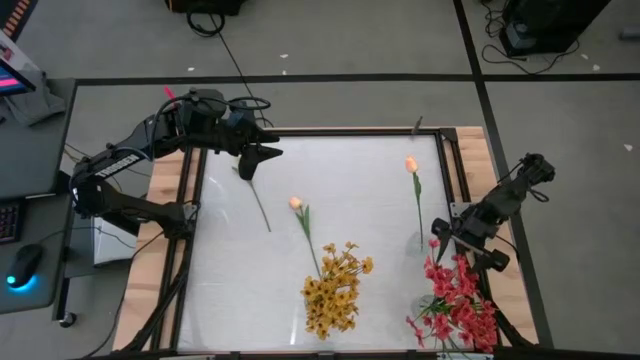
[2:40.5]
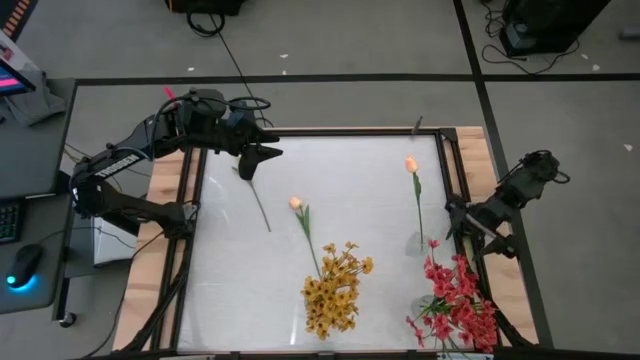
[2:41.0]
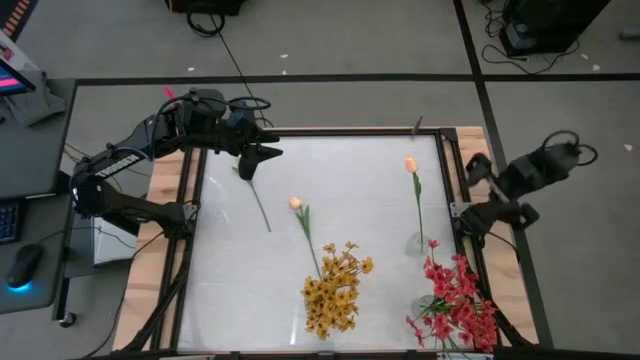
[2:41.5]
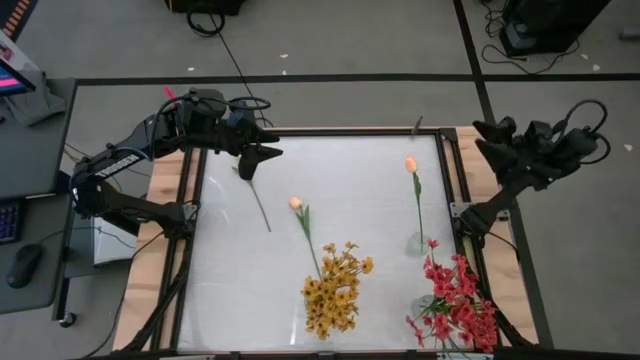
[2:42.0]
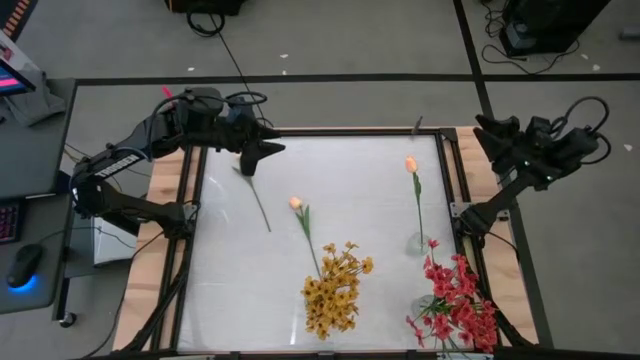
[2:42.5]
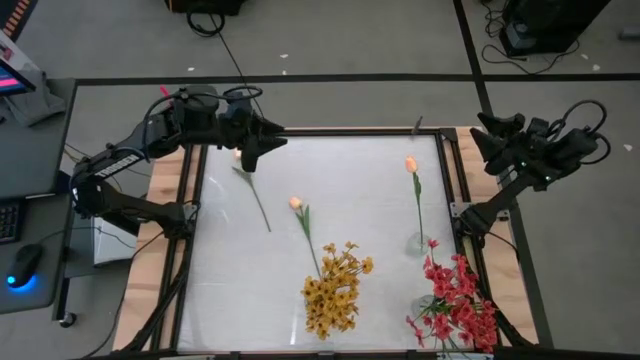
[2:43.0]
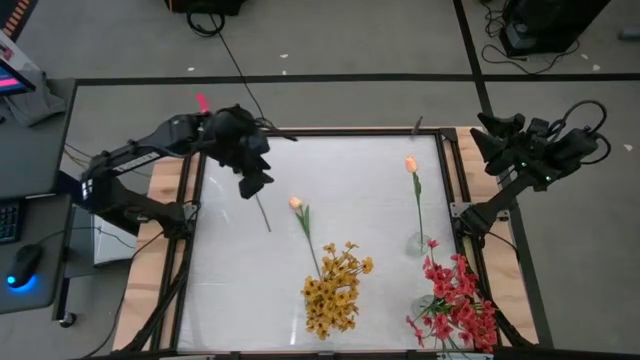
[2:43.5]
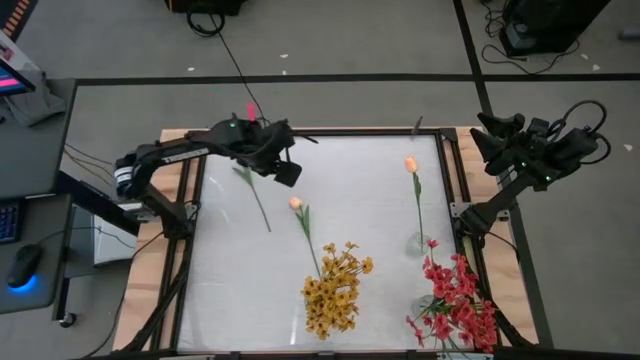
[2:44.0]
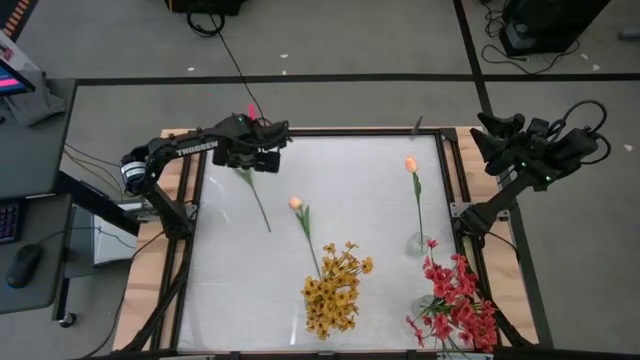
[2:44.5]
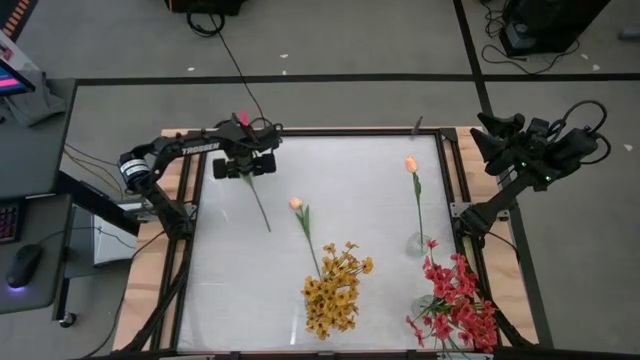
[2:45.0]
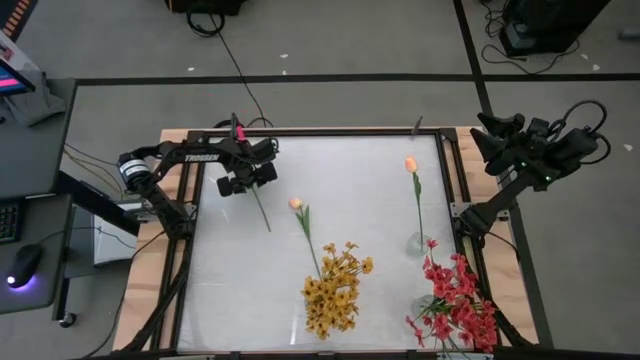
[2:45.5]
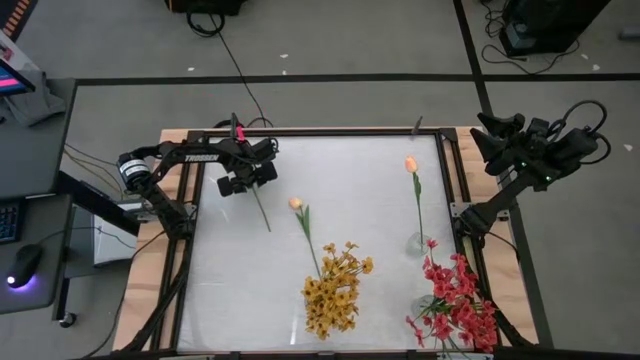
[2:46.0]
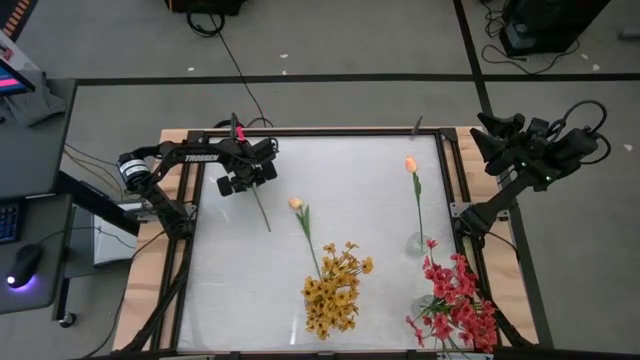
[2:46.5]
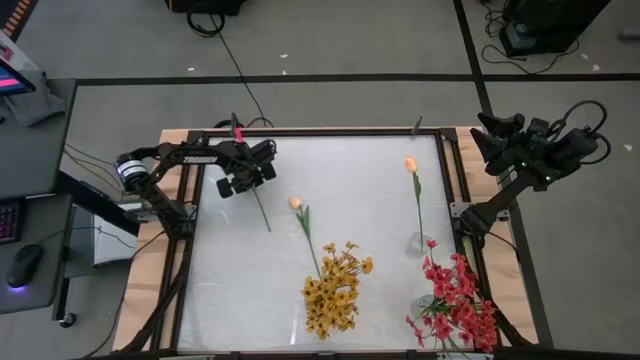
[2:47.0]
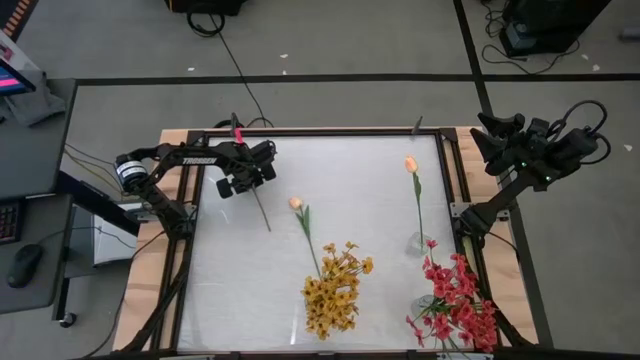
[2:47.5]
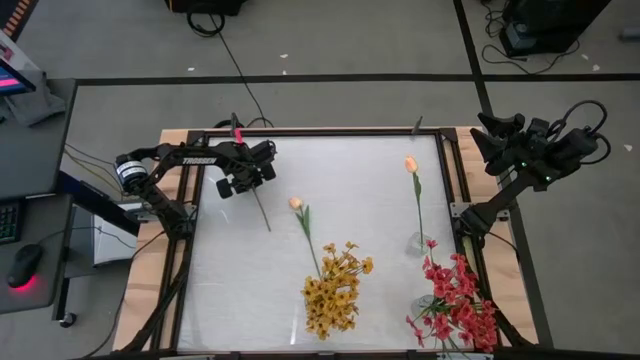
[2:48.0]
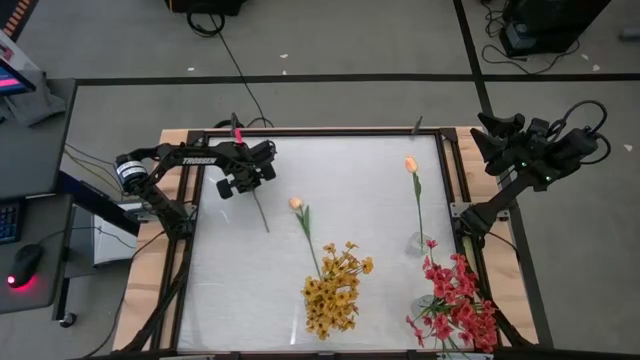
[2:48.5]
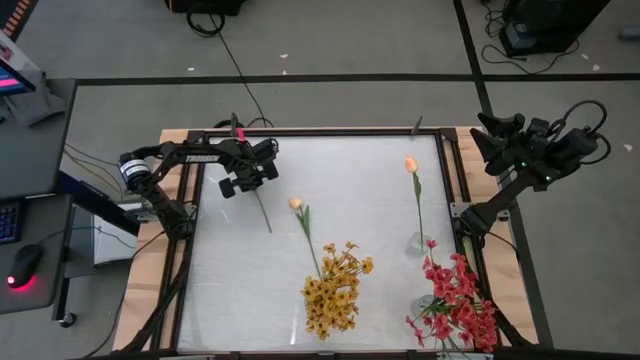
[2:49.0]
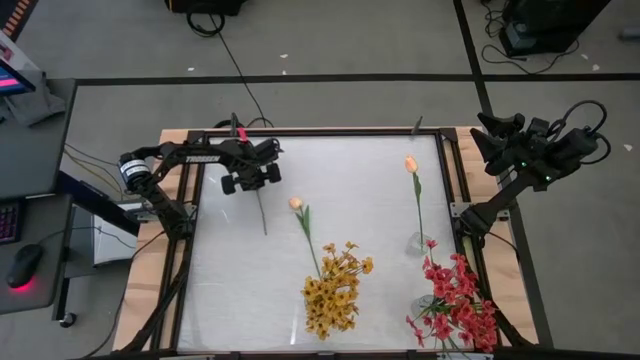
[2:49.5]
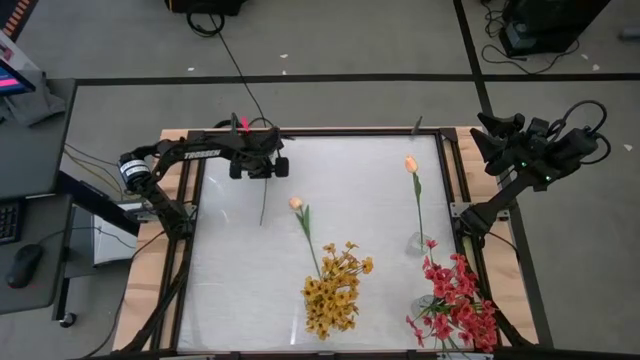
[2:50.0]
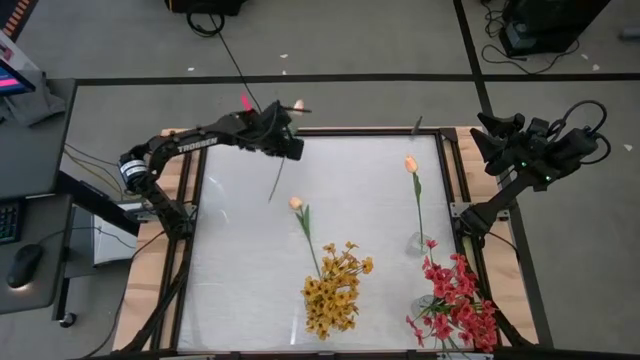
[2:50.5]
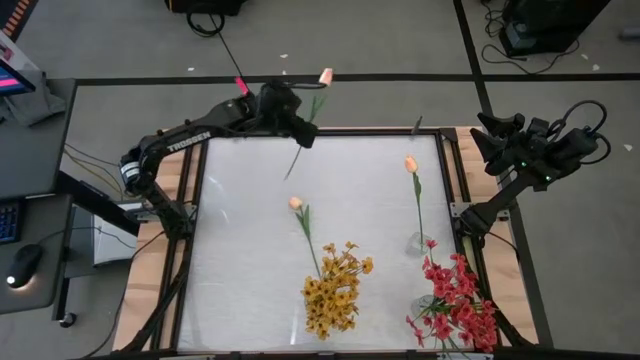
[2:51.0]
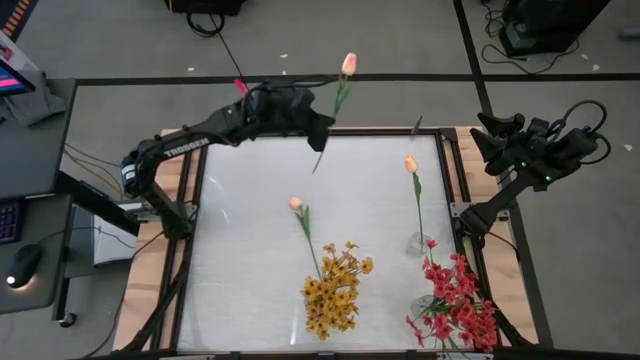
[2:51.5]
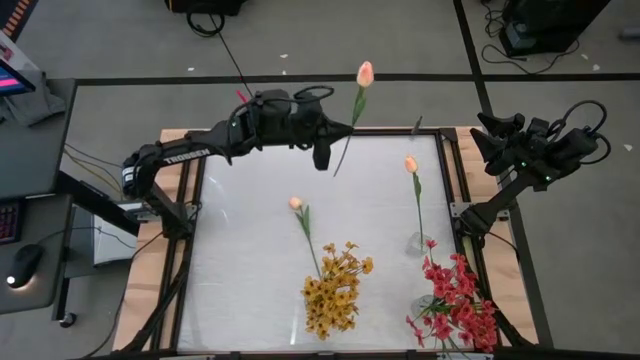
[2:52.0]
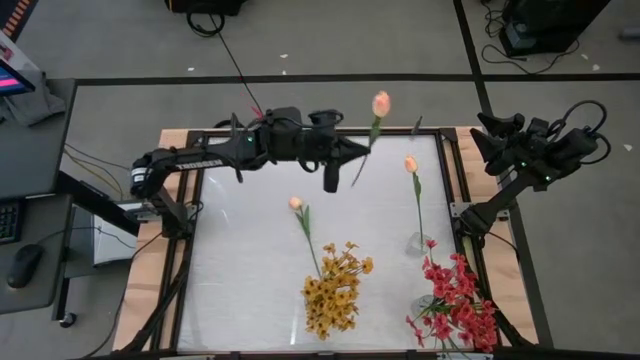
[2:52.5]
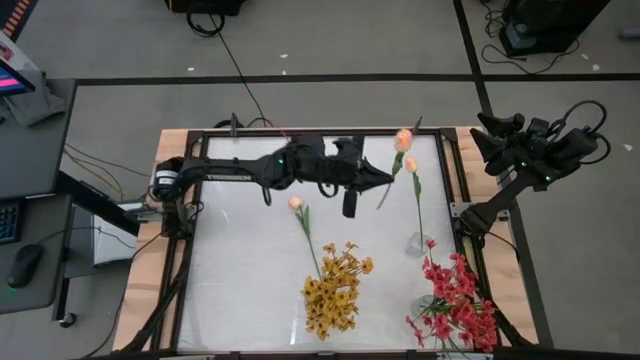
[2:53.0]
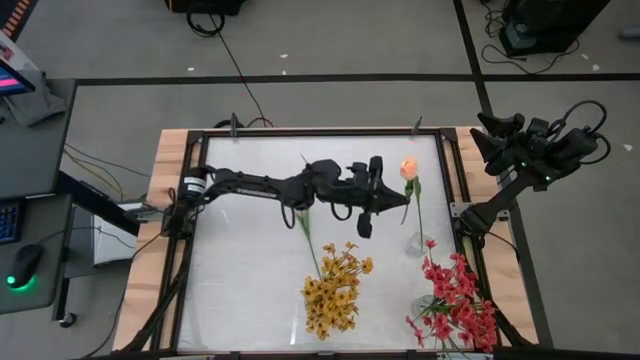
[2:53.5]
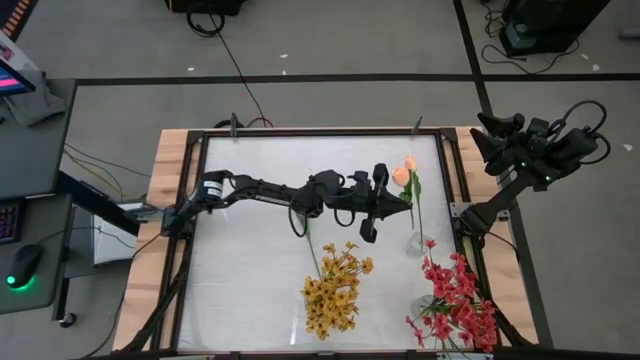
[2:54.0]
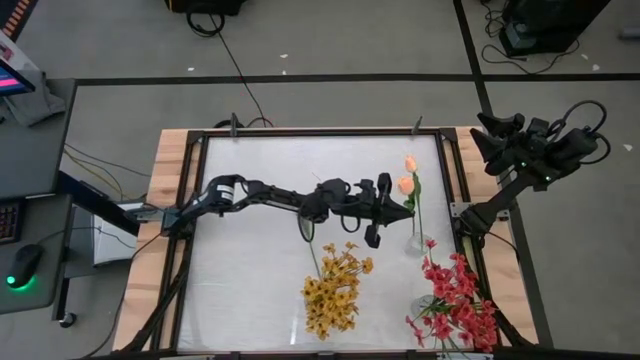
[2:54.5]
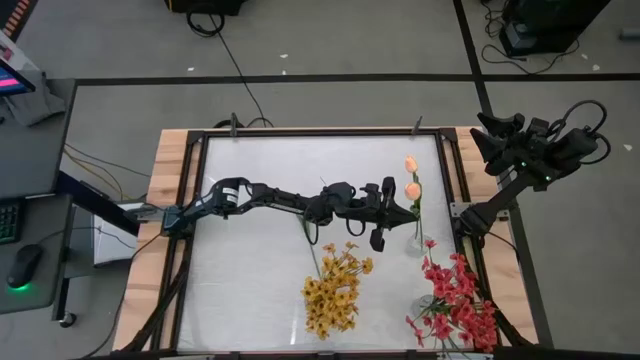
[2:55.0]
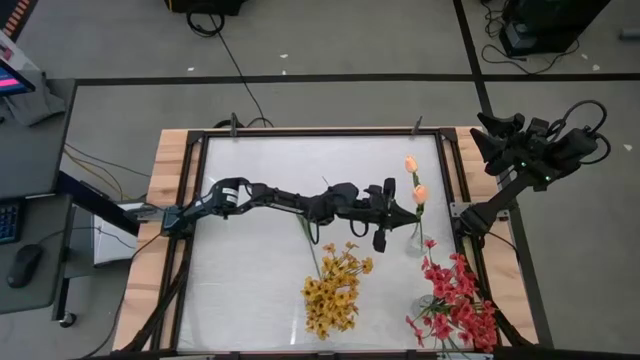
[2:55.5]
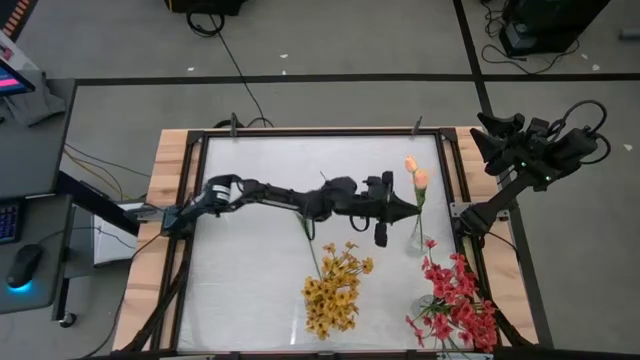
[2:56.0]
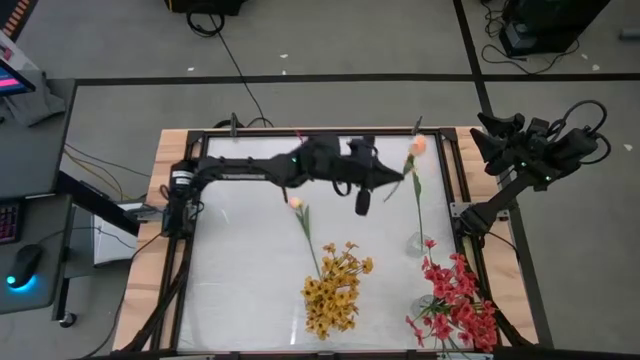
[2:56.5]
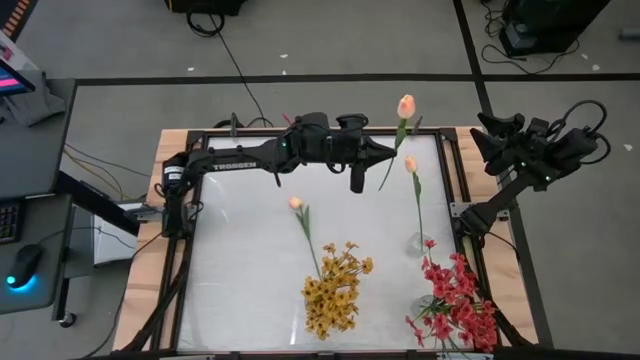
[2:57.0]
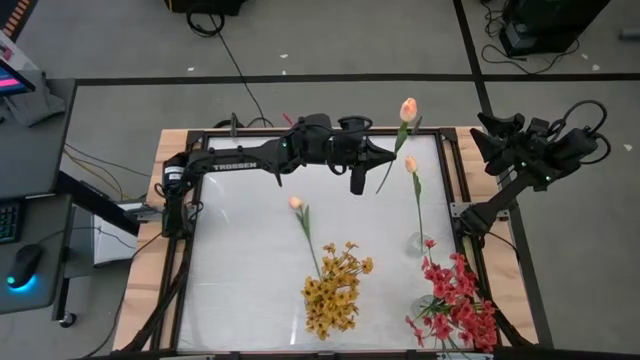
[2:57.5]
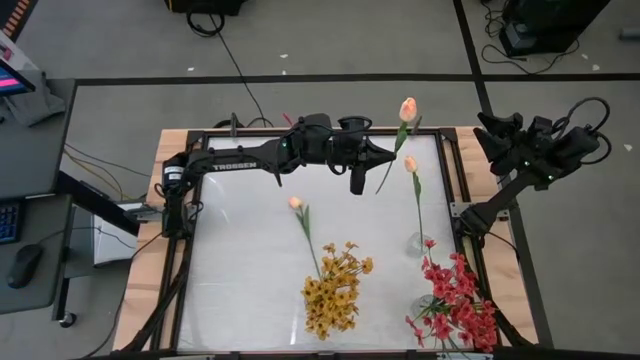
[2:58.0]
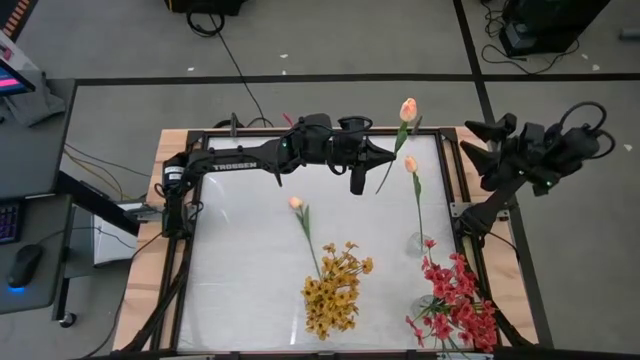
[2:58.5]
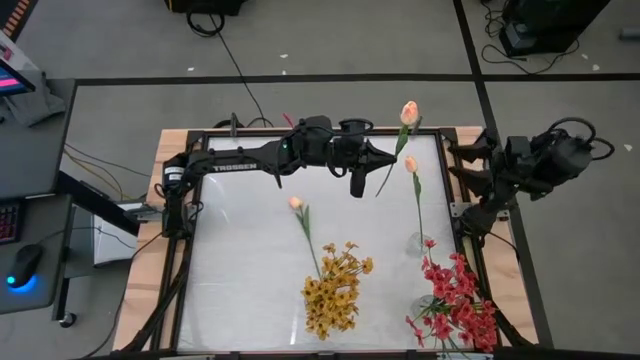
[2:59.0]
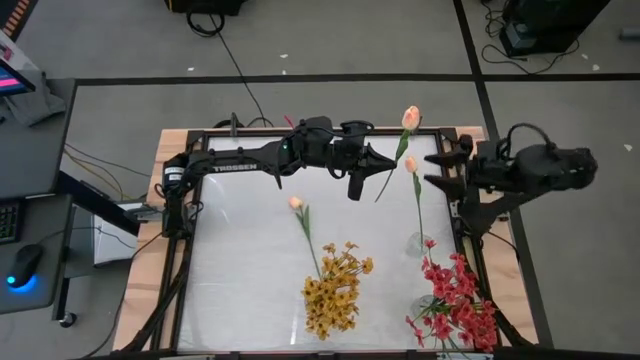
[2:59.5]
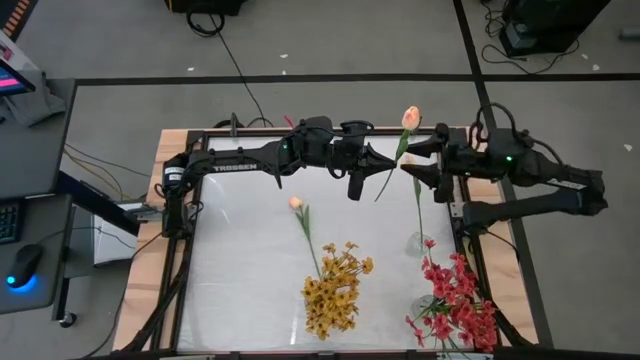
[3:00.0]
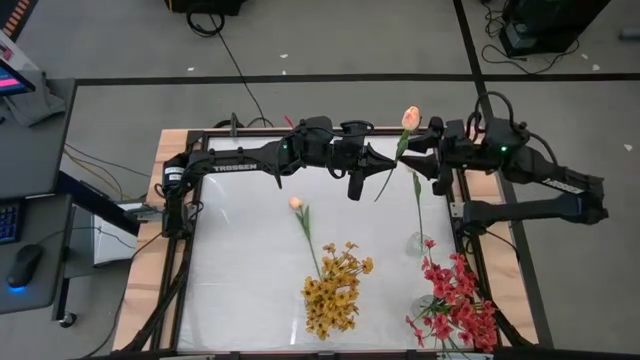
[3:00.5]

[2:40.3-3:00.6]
Task: Sort flowers into vase by color
Put the top light pink flower into the top transparent vase

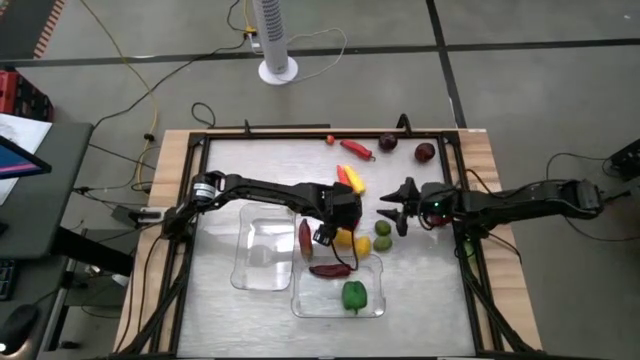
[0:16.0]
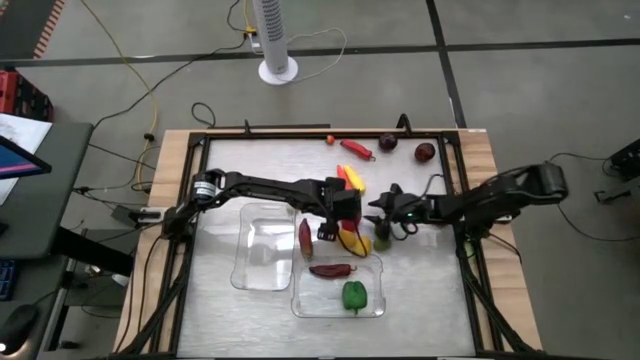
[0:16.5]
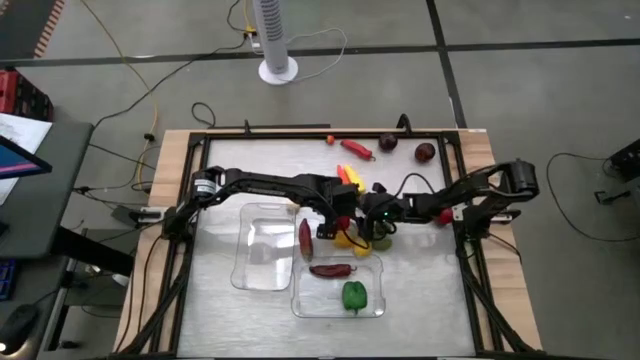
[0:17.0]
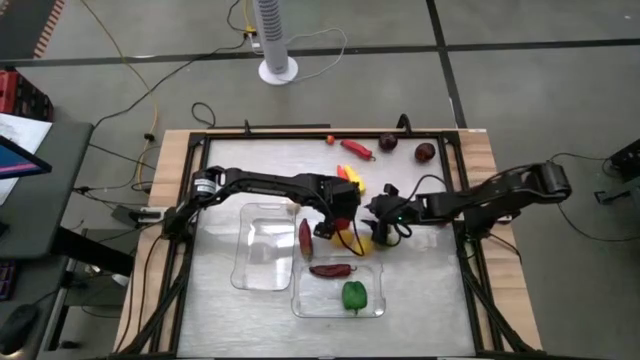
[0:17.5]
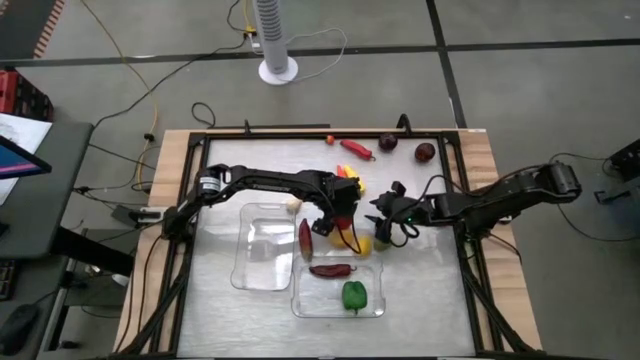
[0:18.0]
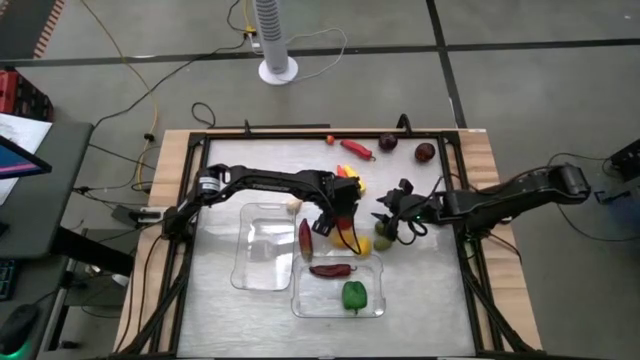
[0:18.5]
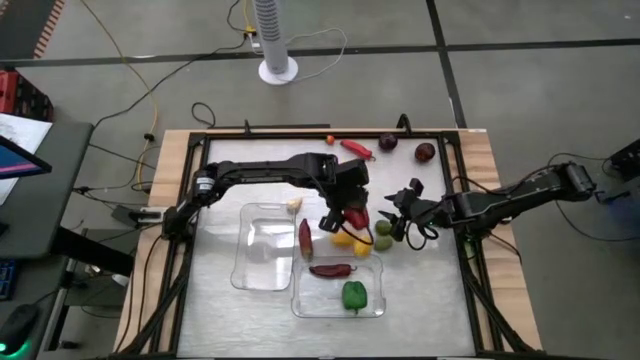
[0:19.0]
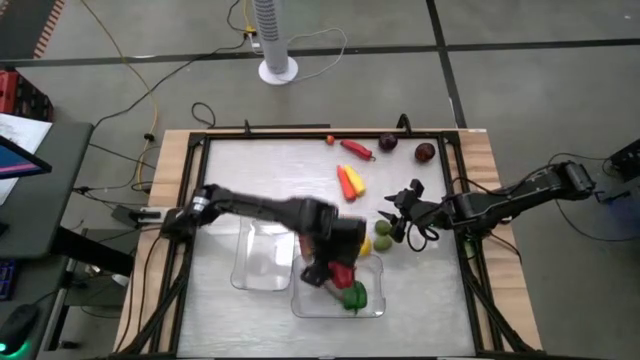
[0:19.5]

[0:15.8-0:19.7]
Task: Sort produce into baskets
Put the bottom red bell pepper into the right transparent bin
